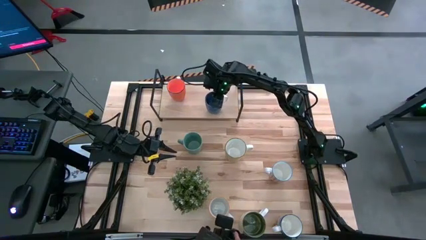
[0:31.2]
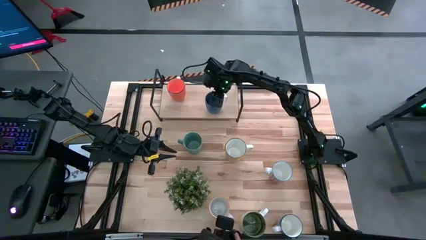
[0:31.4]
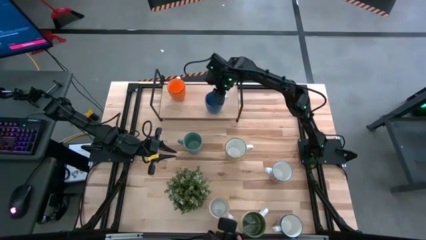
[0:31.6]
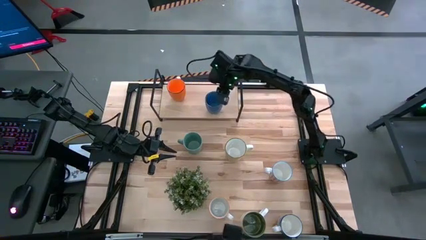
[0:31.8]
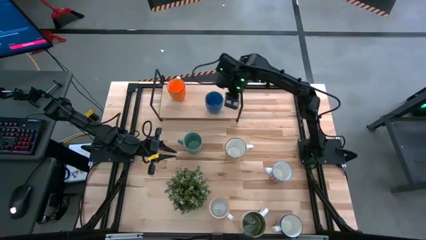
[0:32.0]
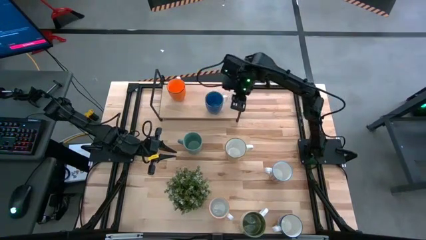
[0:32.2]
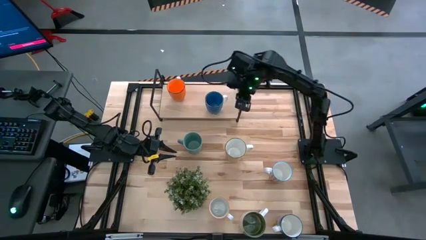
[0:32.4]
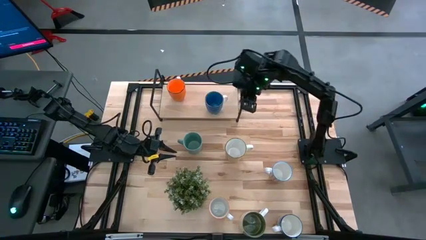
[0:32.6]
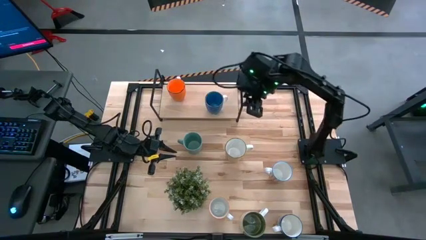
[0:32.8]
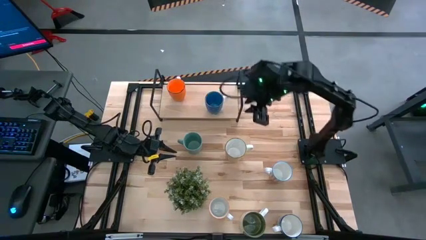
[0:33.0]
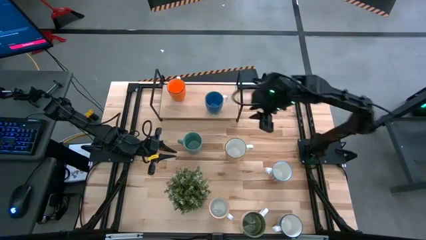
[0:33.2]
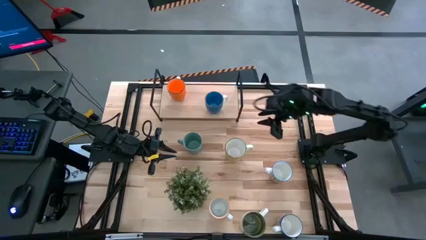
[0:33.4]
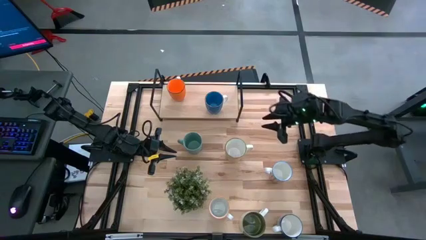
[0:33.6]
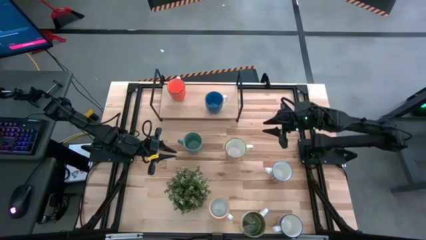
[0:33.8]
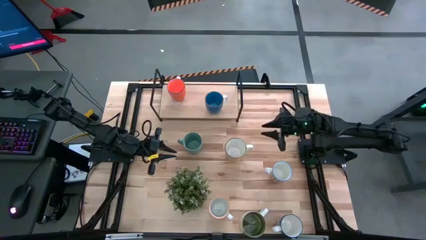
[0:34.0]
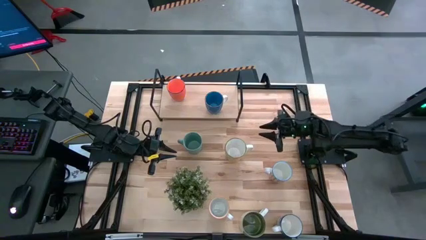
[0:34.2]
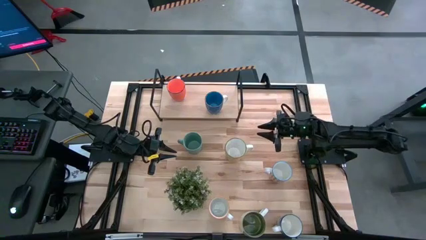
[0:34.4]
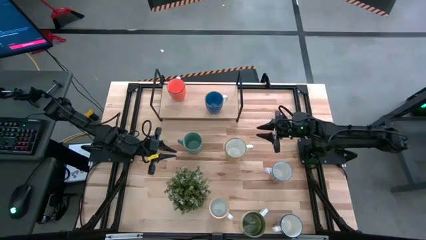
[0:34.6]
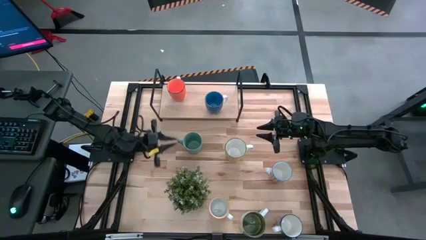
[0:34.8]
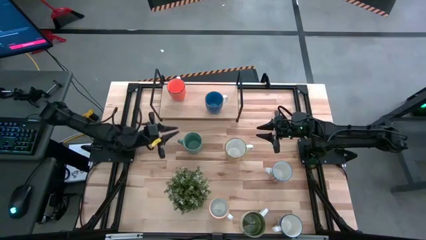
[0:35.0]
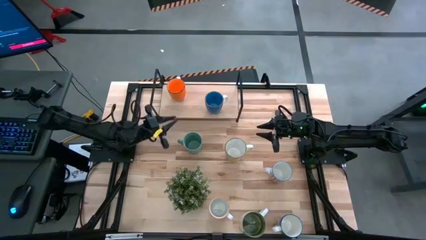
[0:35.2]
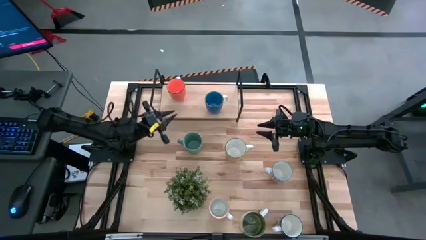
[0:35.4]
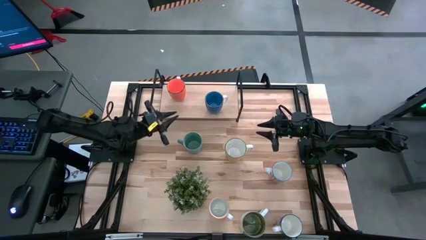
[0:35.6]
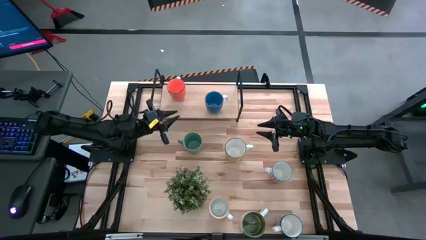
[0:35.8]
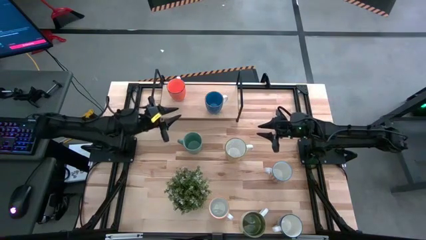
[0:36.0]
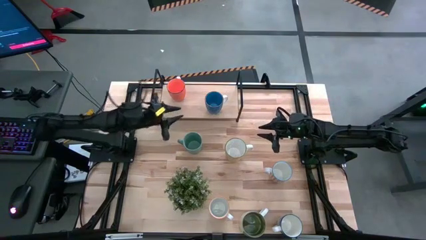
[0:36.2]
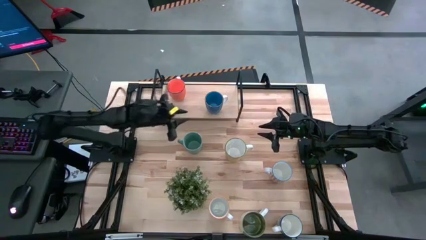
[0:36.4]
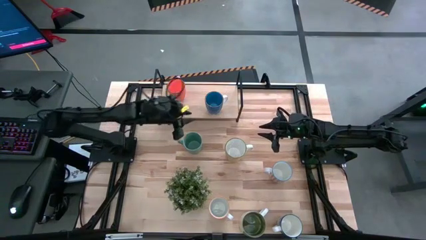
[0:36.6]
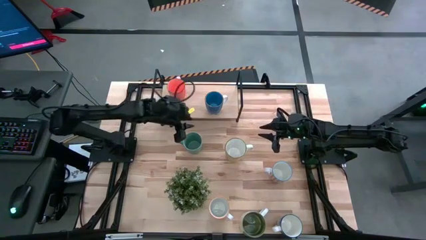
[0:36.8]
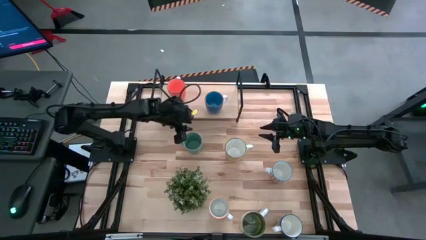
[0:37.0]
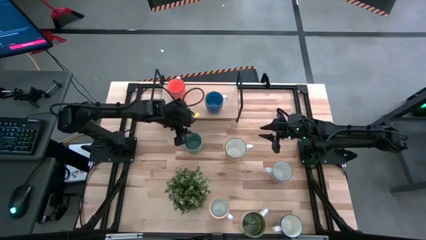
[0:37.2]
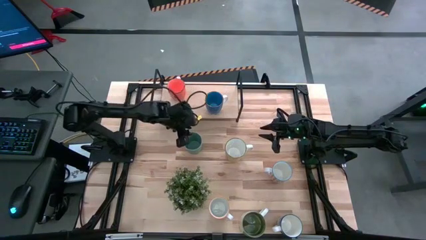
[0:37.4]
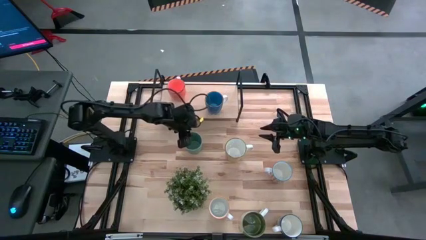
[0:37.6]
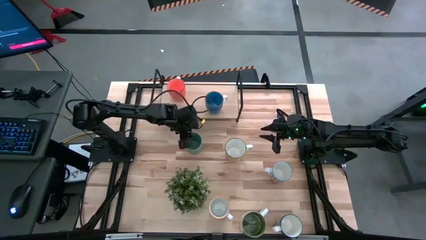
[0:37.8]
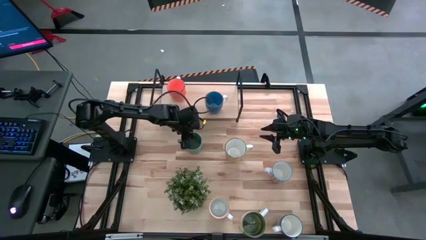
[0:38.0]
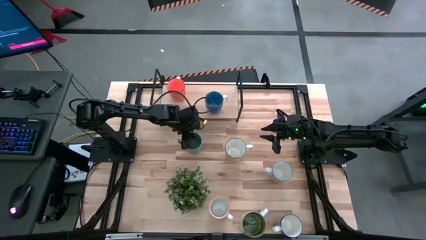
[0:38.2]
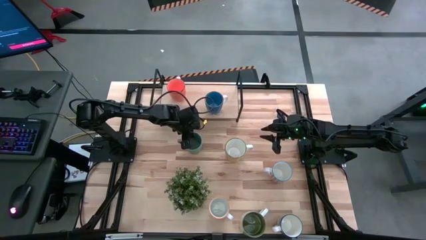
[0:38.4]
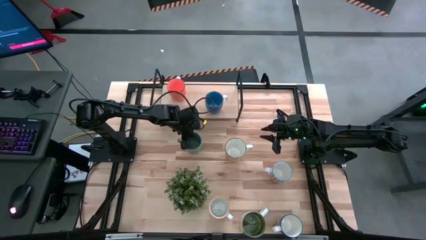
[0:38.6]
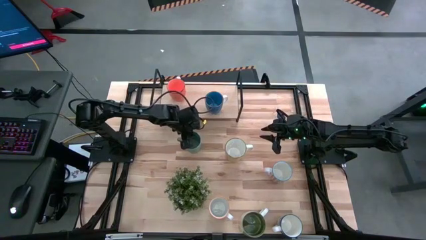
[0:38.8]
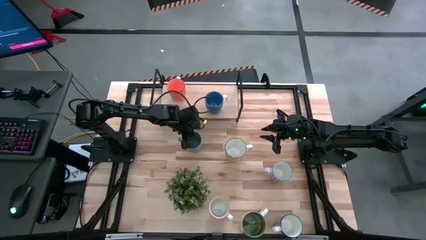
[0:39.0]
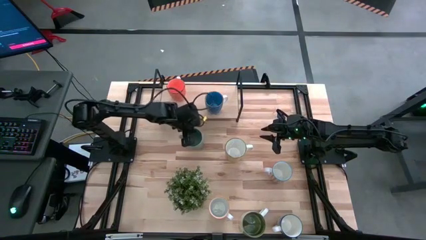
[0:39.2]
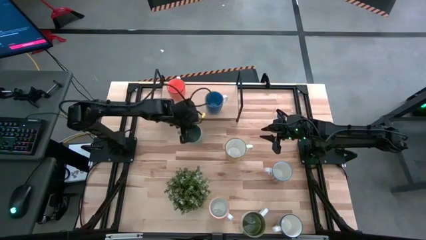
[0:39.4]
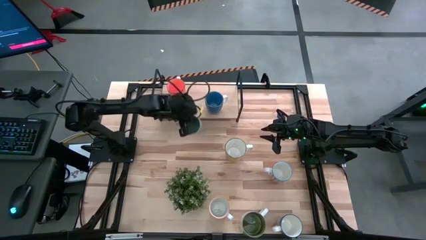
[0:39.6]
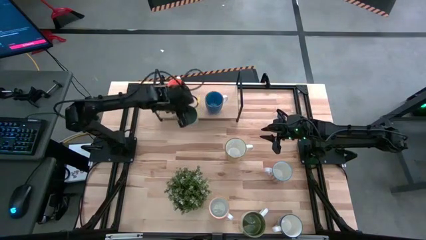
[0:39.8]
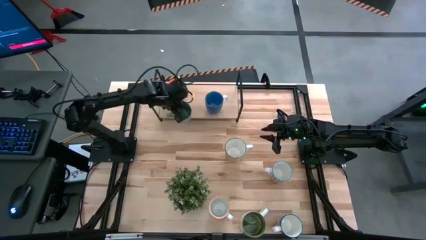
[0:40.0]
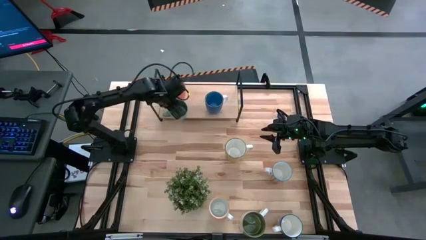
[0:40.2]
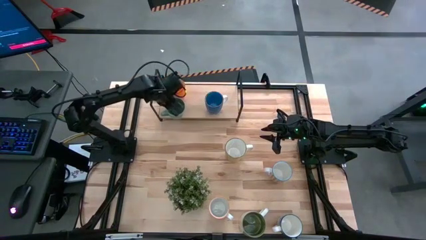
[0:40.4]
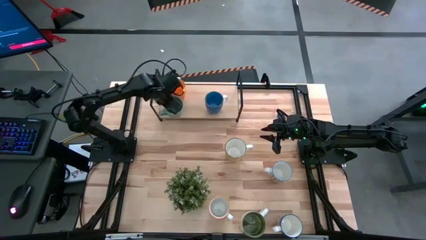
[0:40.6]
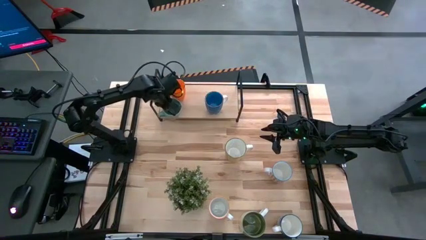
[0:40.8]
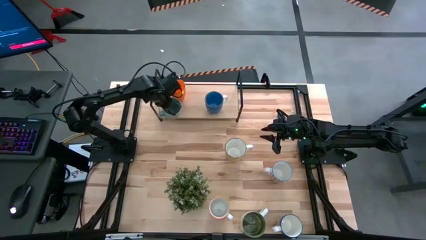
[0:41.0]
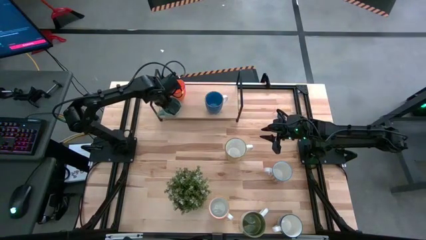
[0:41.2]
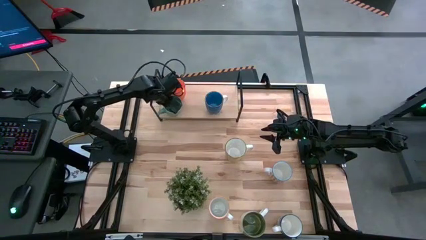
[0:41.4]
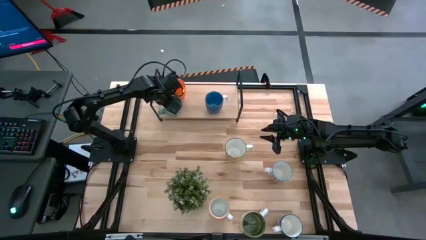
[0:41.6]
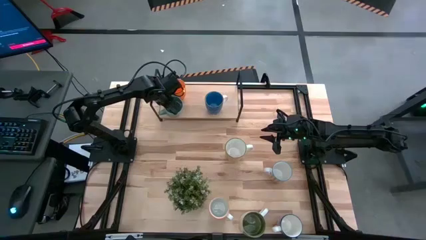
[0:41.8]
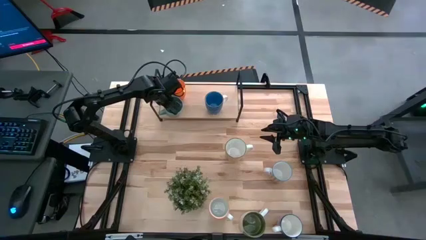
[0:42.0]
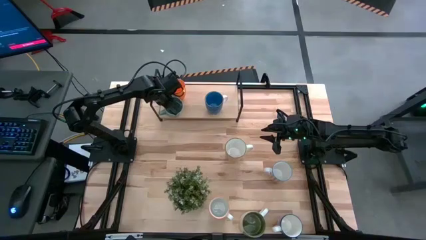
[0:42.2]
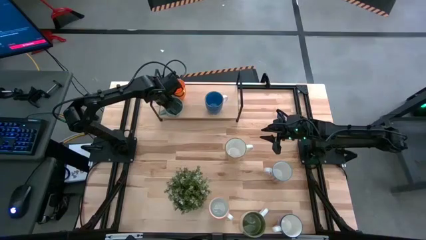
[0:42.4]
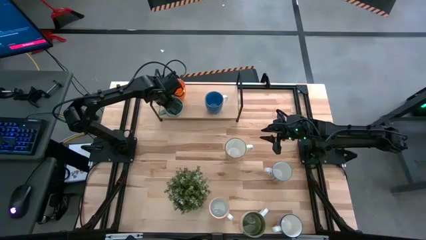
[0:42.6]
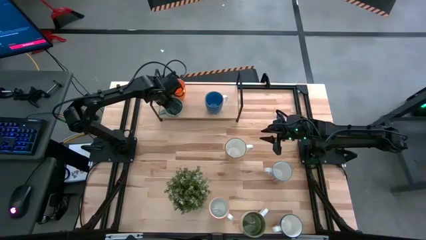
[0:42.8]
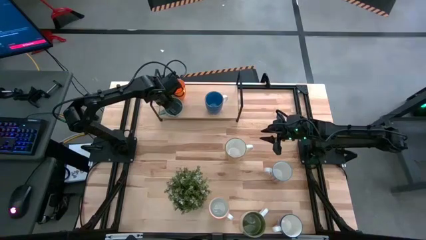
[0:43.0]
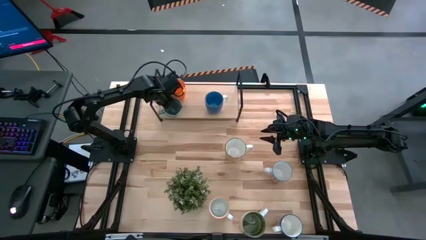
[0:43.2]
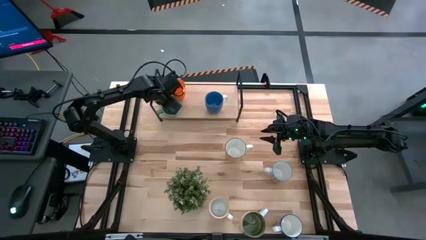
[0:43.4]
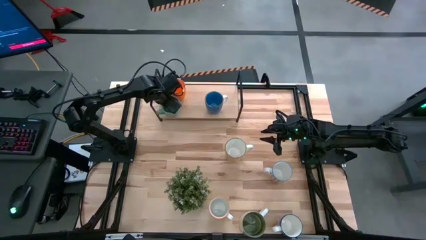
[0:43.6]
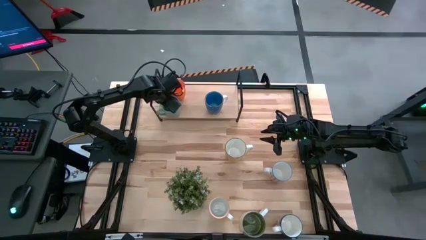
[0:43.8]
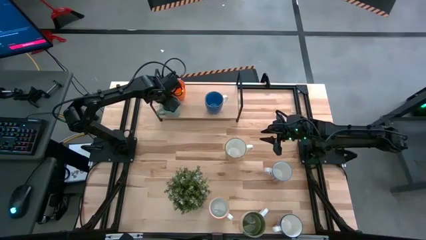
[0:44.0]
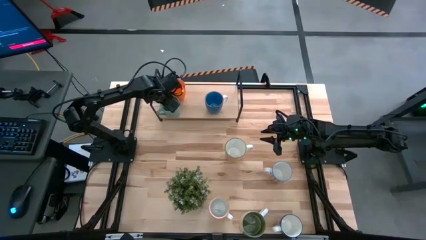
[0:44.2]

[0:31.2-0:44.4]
Task: Place coffee mugs
Put the green mug on the shelf
